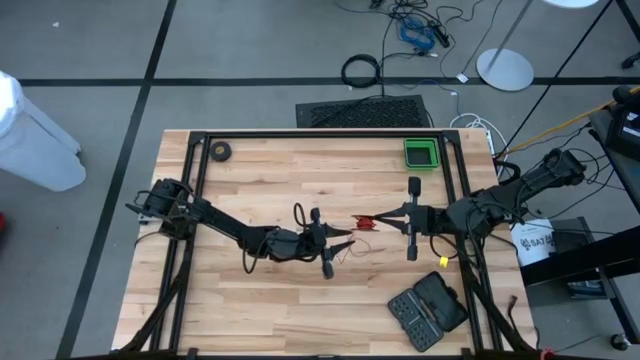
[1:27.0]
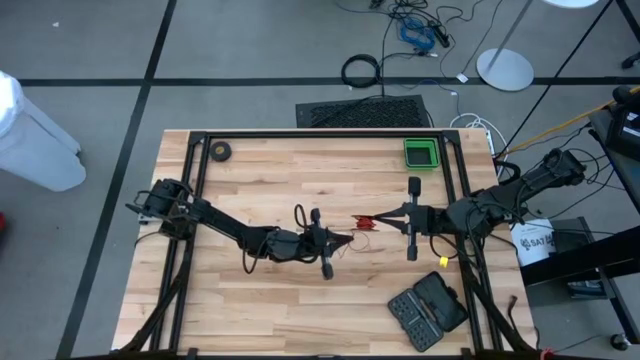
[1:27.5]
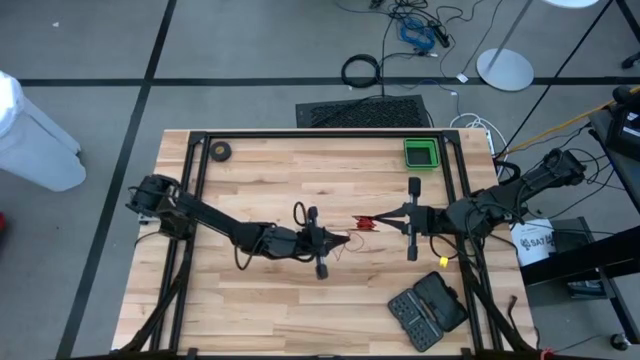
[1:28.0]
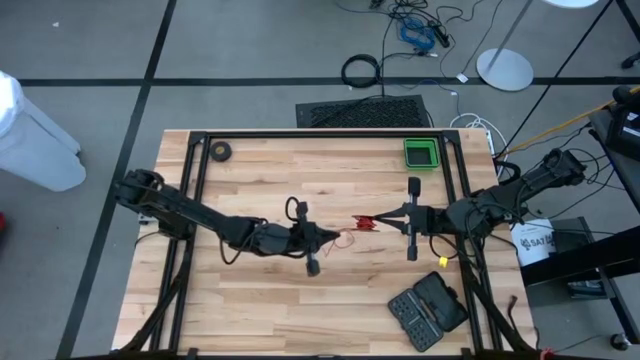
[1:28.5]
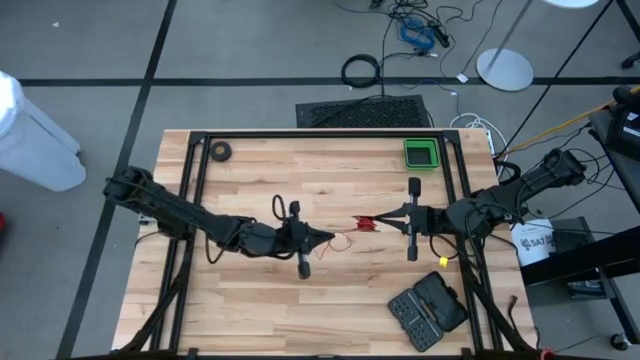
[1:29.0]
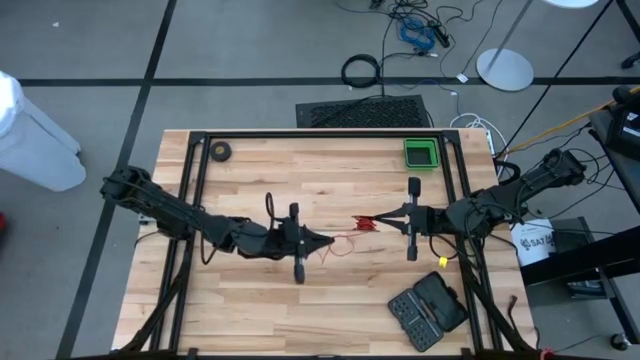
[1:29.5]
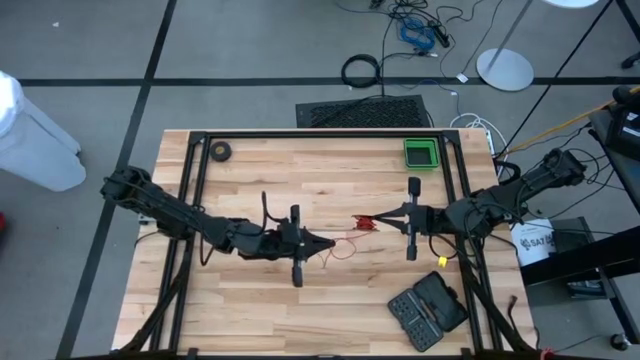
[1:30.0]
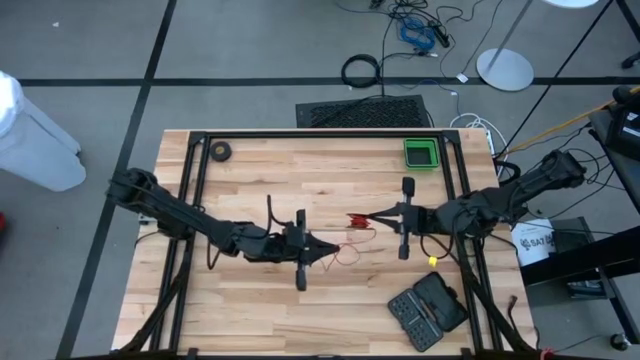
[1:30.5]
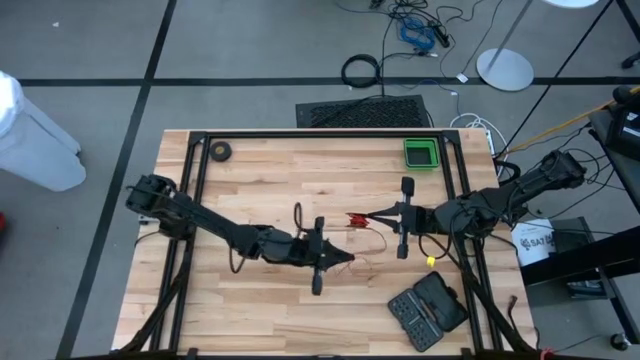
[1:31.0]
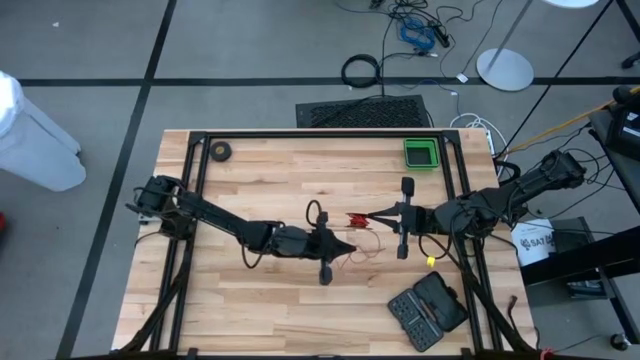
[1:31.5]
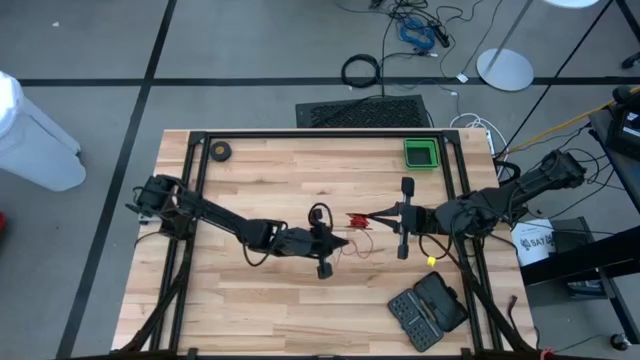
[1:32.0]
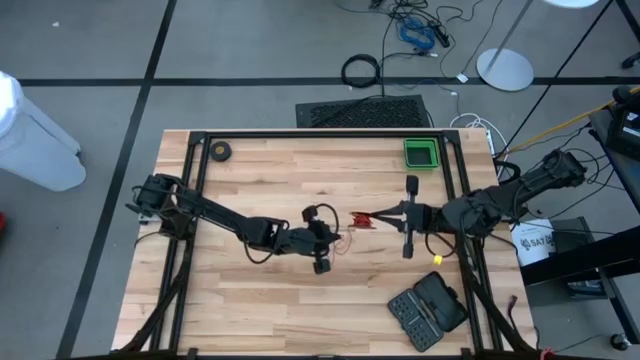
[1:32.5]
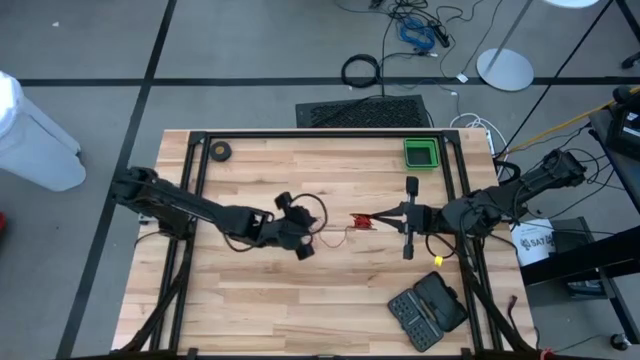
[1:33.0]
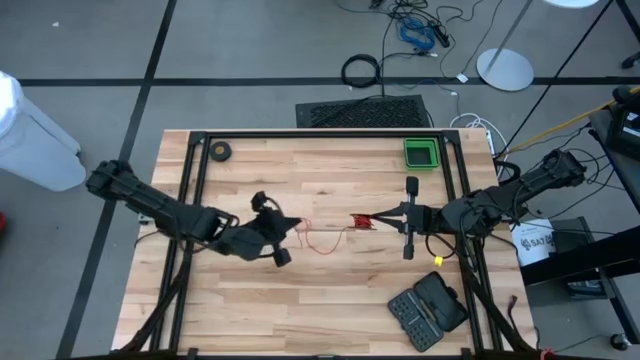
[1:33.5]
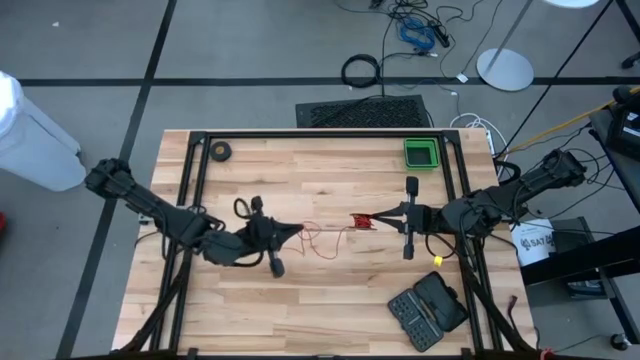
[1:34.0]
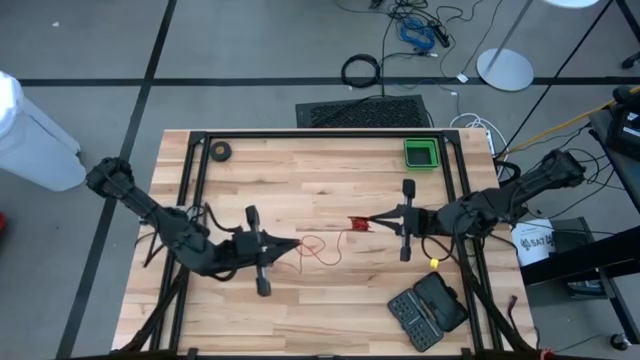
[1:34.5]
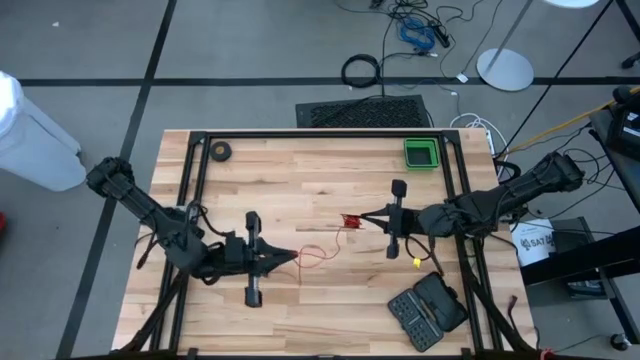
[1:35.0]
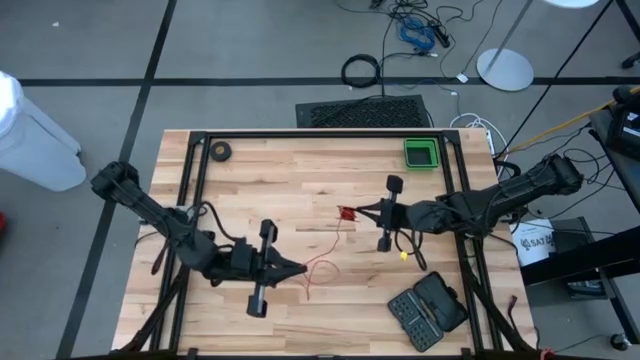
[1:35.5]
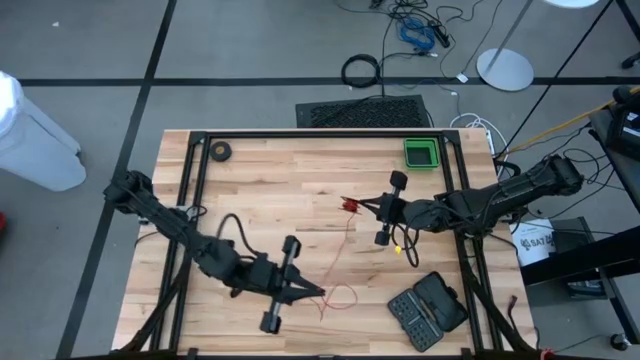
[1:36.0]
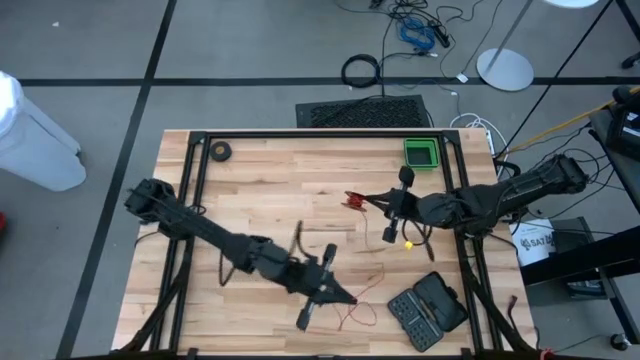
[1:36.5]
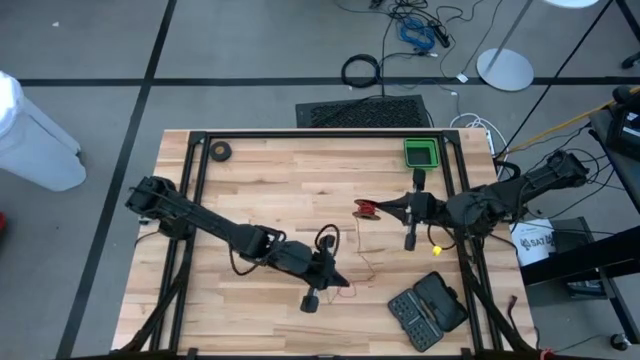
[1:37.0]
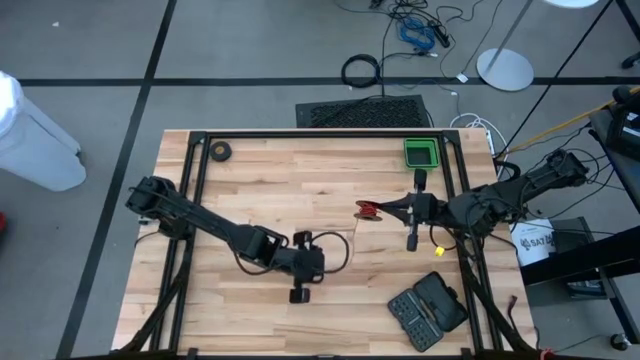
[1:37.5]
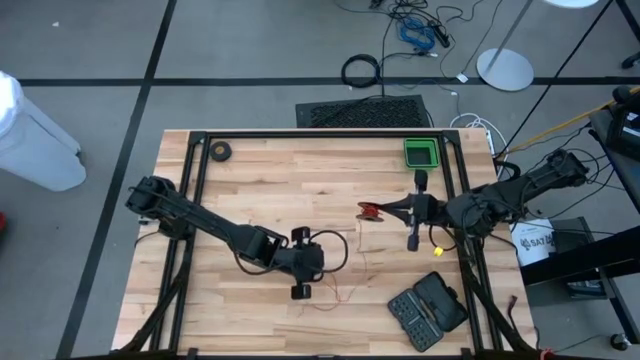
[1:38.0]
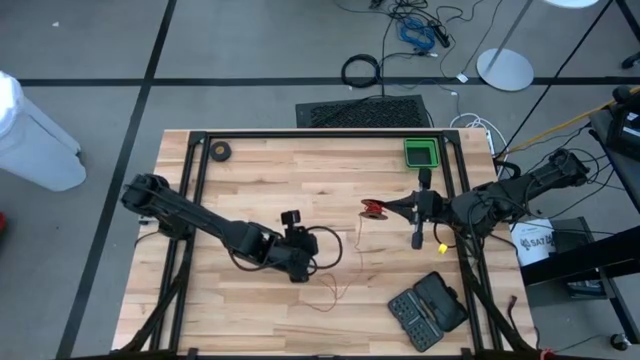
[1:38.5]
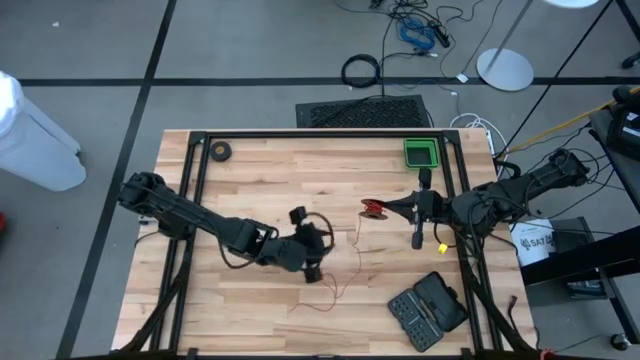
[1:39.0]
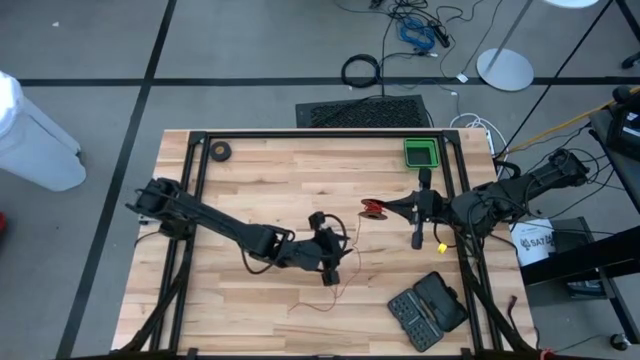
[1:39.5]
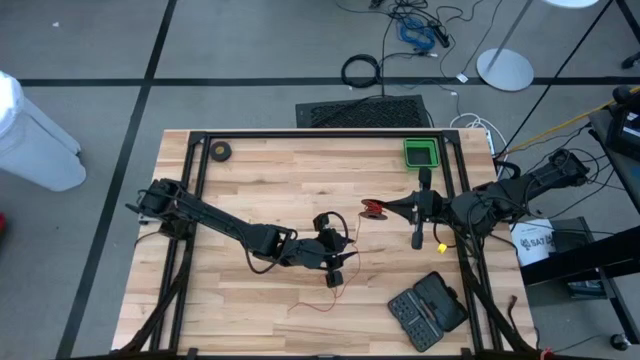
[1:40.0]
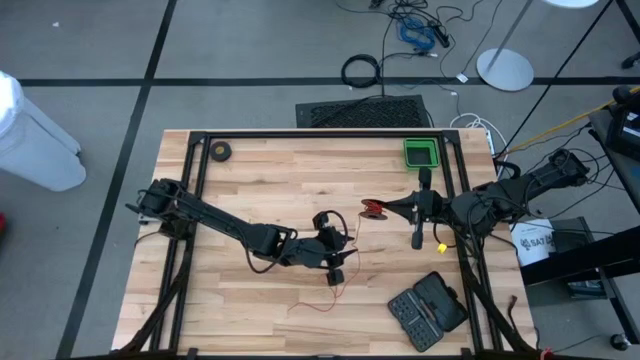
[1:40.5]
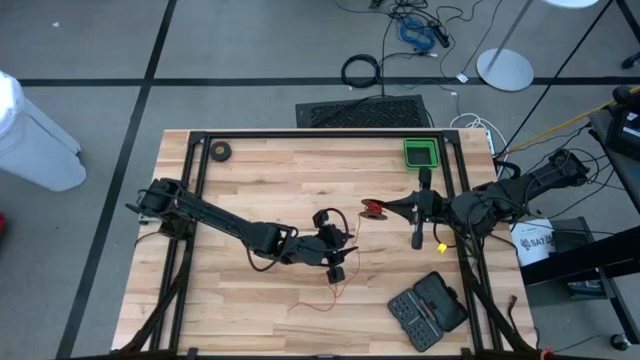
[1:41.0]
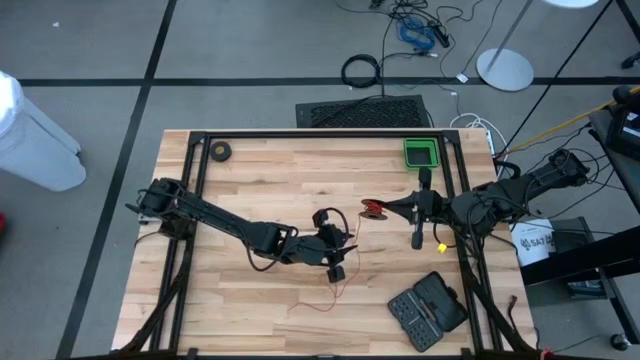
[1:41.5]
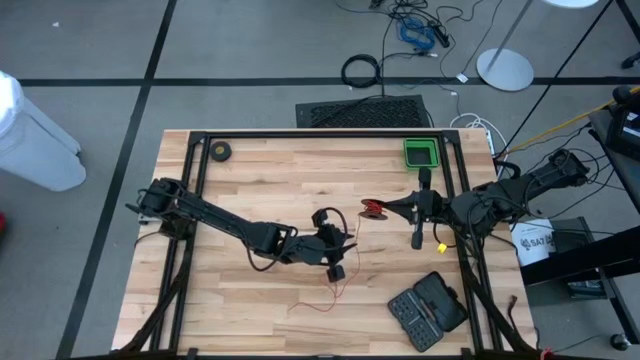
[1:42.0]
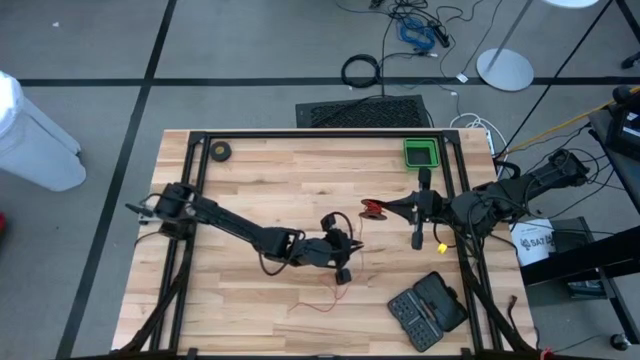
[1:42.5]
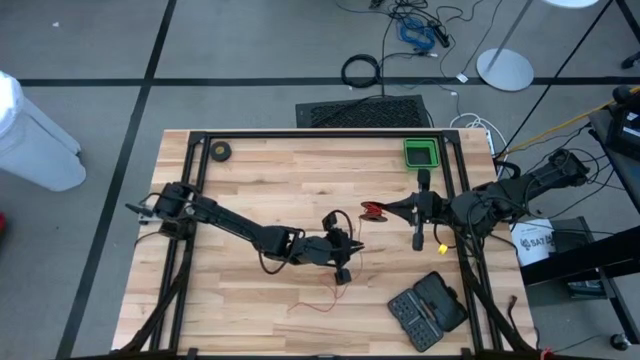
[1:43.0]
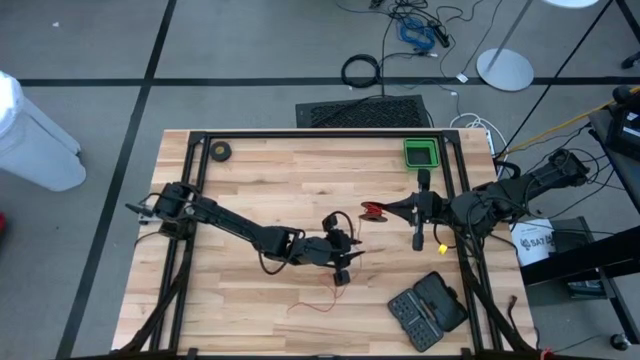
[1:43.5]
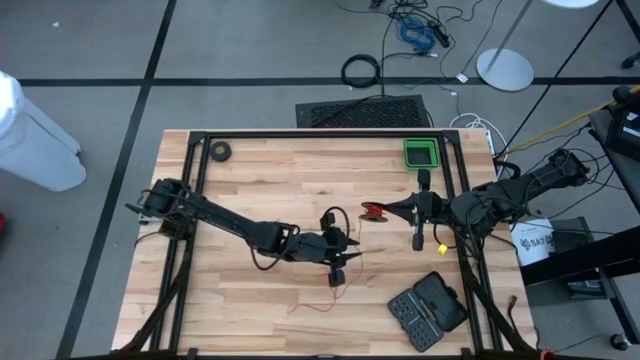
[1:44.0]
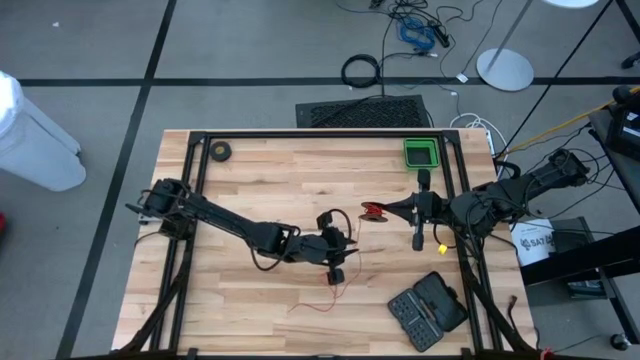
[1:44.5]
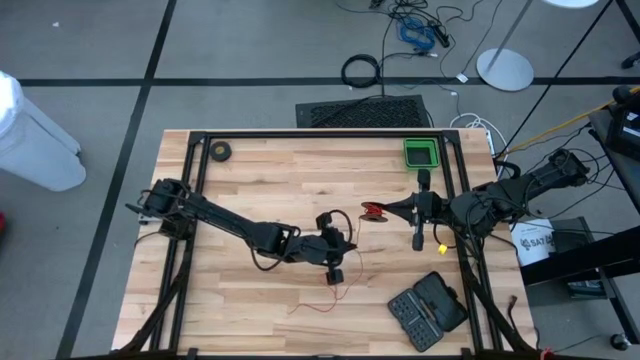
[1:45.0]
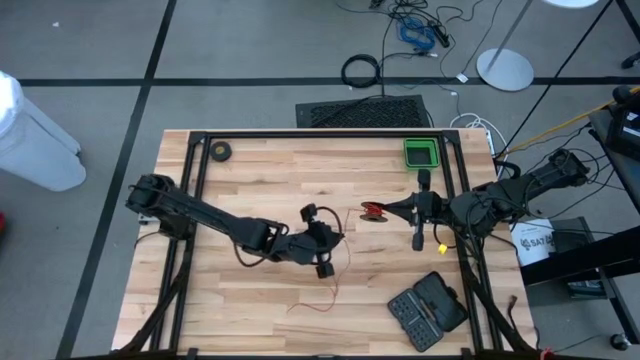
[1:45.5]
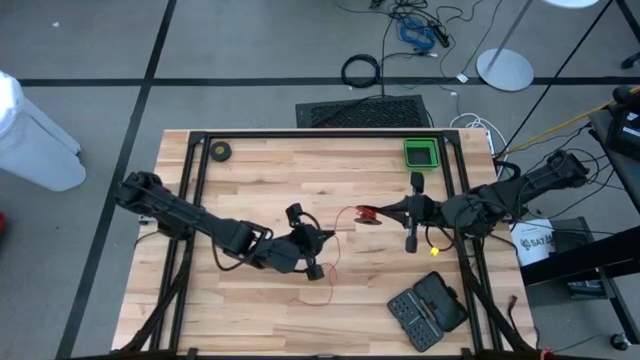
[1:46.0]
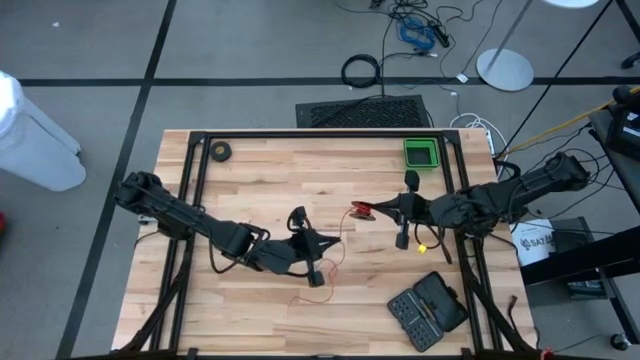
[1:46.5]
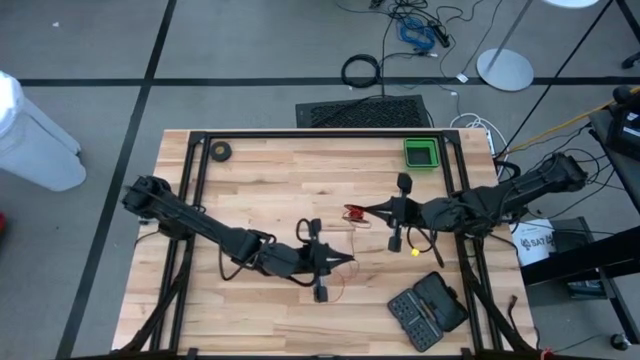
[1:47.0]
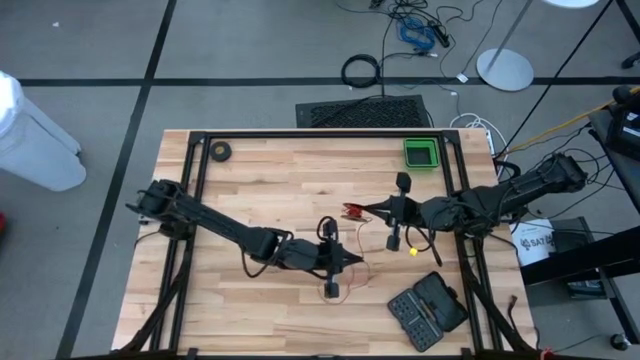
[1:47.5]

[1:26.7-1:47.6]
Task: Coil cords
Uncoil the red wire from the spool
